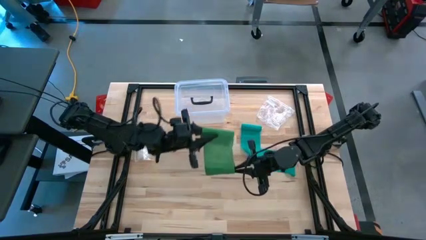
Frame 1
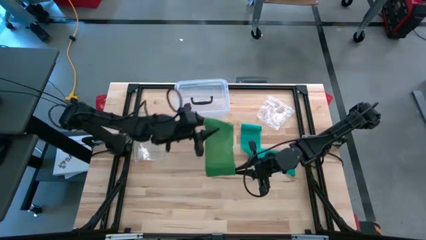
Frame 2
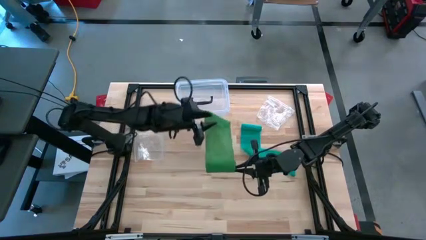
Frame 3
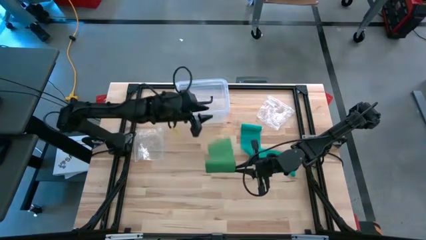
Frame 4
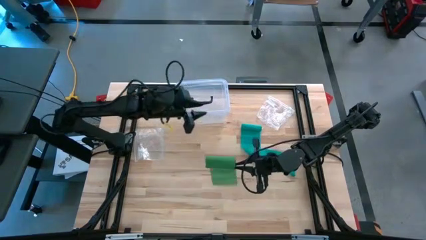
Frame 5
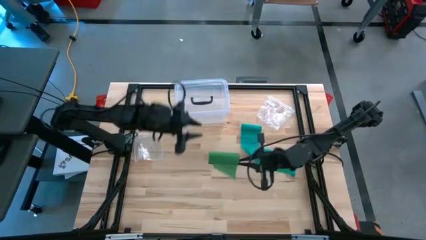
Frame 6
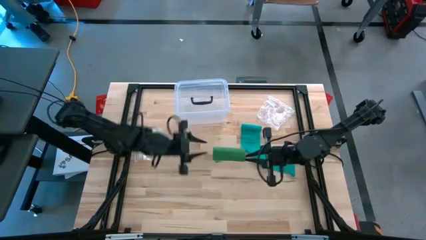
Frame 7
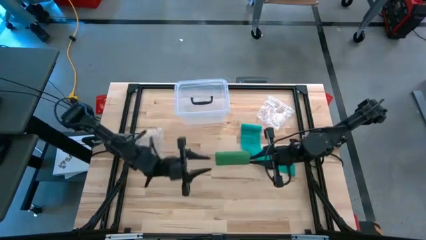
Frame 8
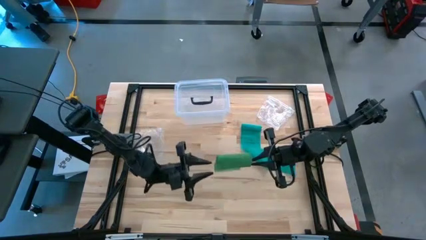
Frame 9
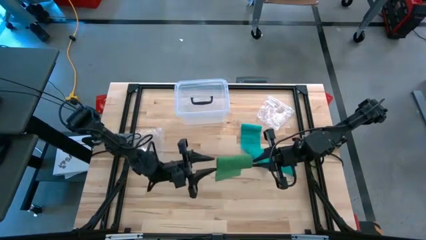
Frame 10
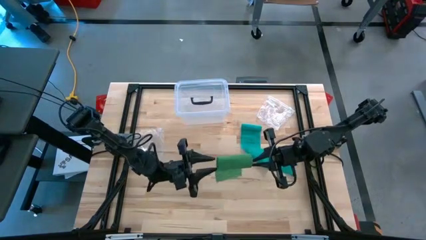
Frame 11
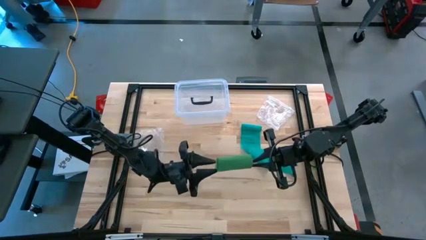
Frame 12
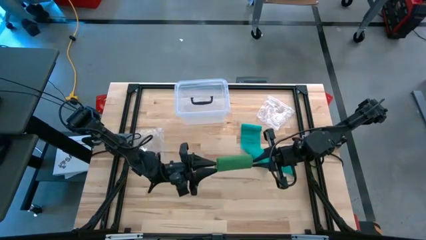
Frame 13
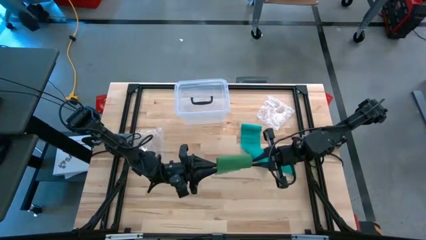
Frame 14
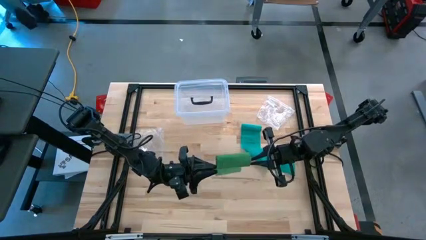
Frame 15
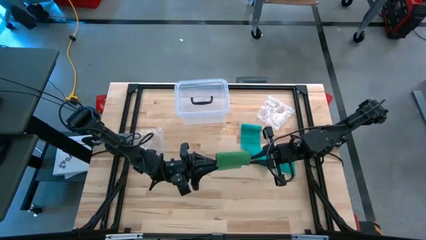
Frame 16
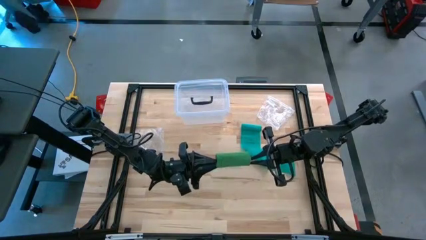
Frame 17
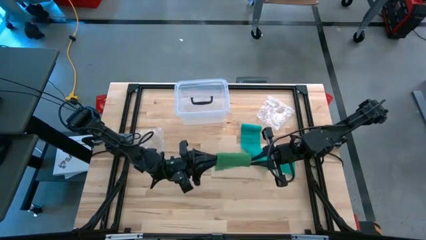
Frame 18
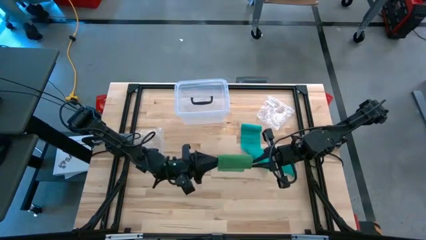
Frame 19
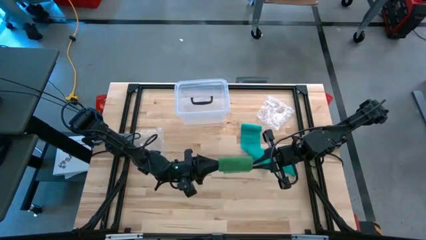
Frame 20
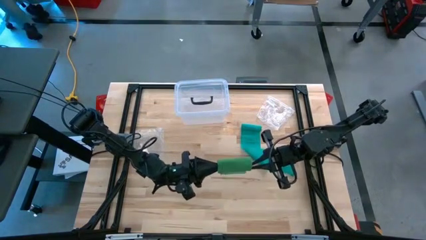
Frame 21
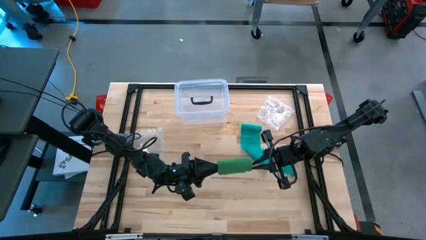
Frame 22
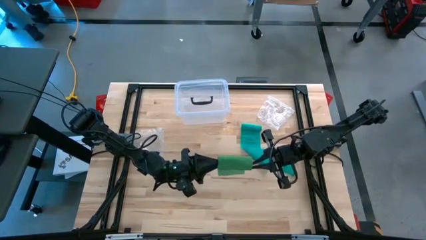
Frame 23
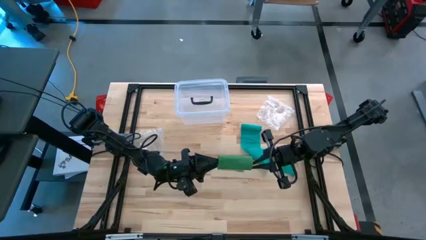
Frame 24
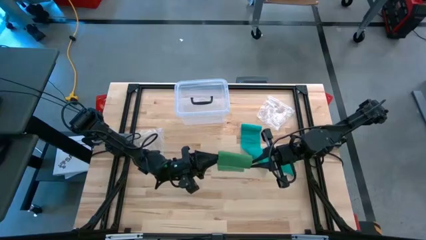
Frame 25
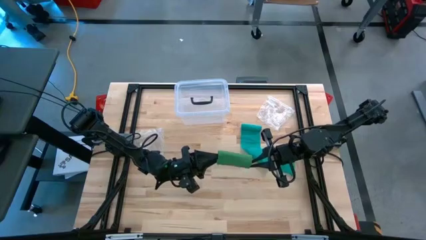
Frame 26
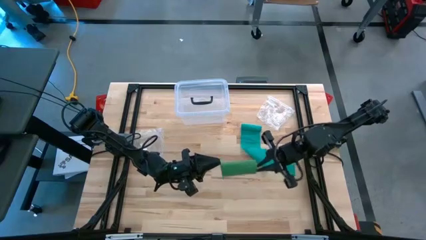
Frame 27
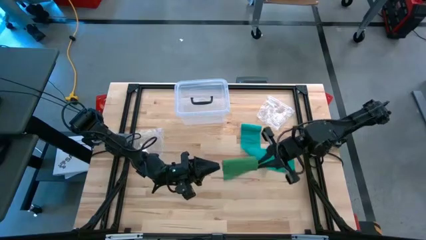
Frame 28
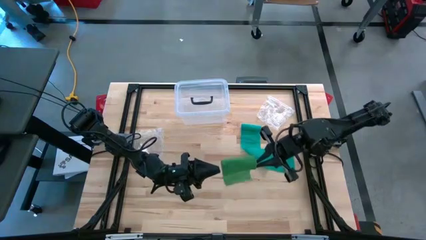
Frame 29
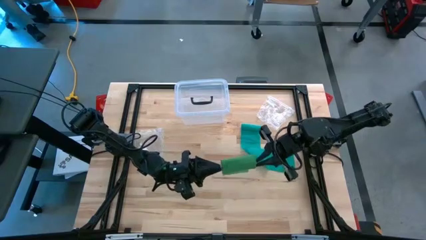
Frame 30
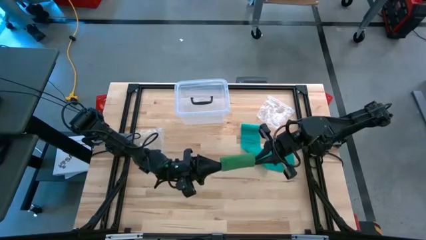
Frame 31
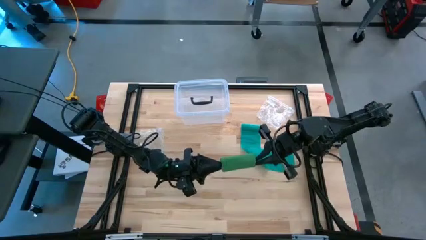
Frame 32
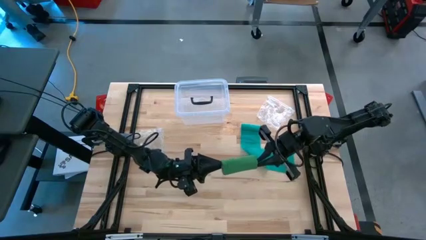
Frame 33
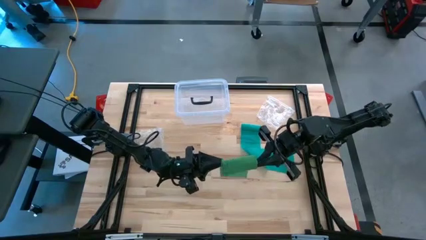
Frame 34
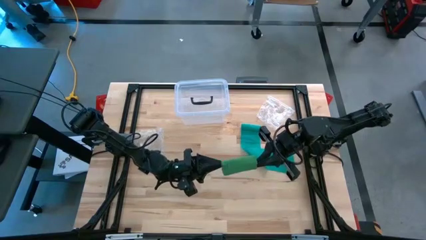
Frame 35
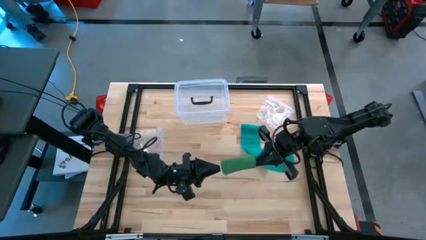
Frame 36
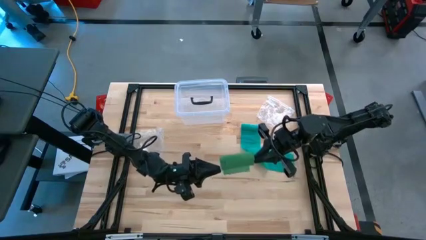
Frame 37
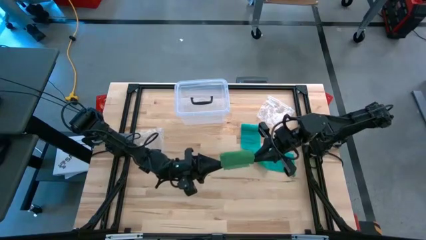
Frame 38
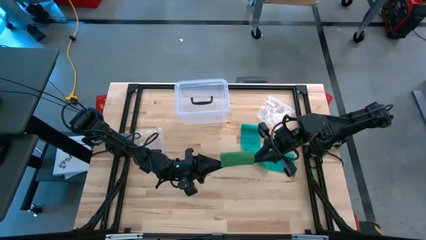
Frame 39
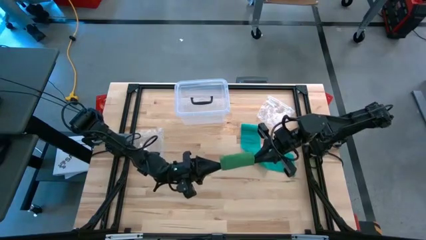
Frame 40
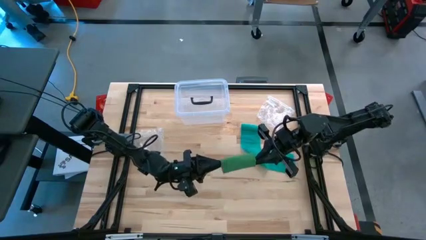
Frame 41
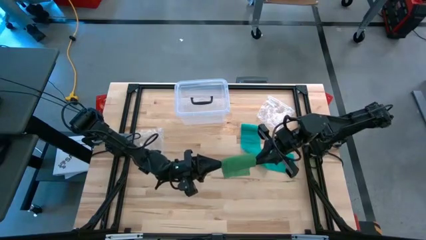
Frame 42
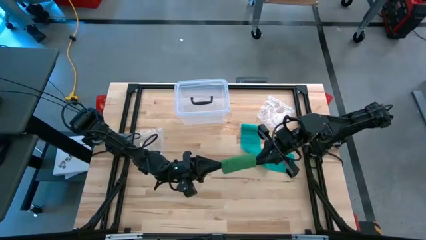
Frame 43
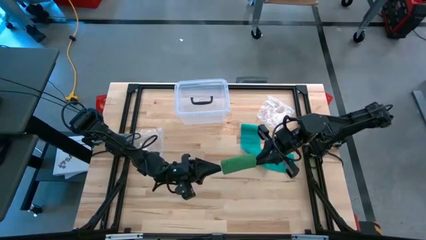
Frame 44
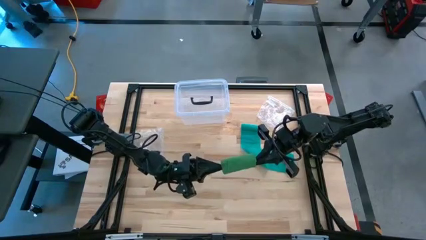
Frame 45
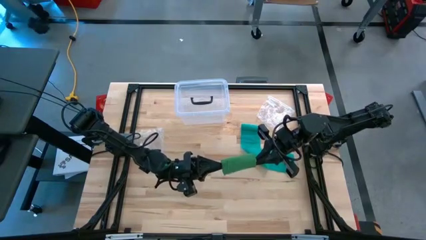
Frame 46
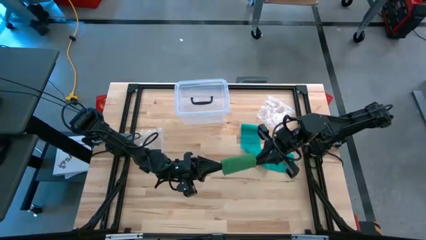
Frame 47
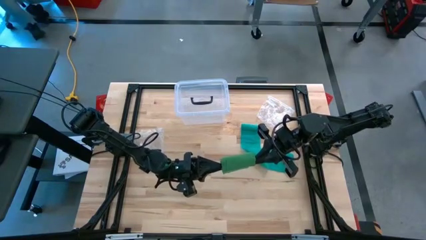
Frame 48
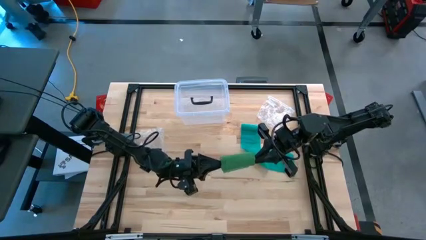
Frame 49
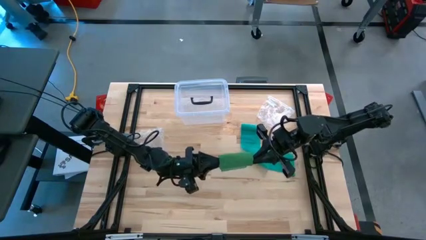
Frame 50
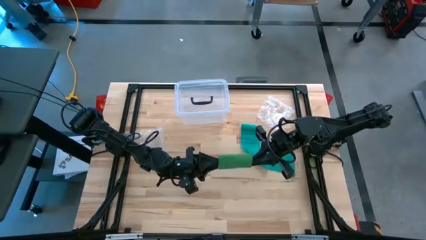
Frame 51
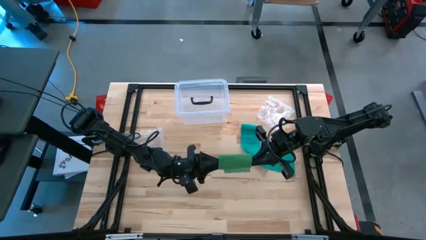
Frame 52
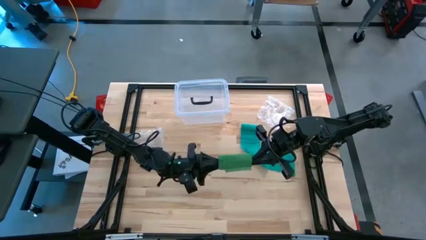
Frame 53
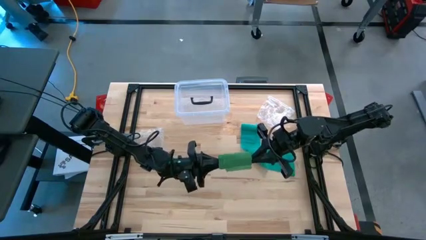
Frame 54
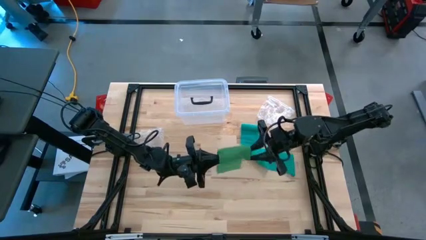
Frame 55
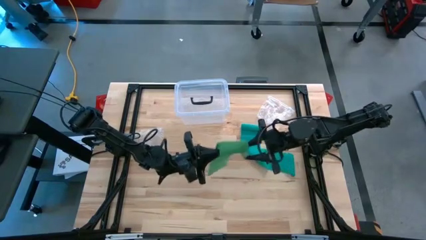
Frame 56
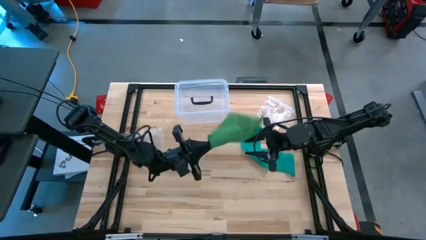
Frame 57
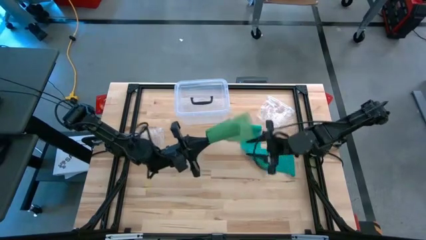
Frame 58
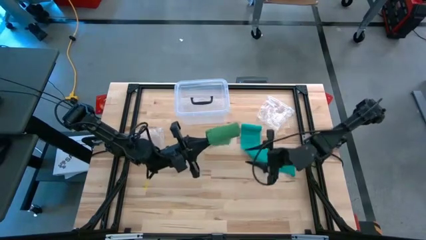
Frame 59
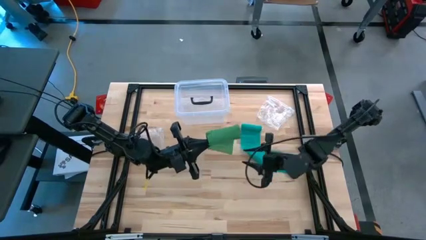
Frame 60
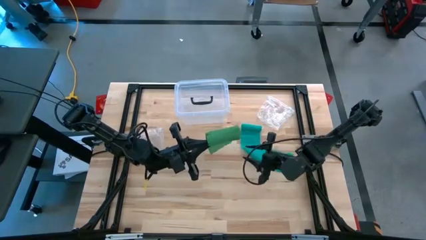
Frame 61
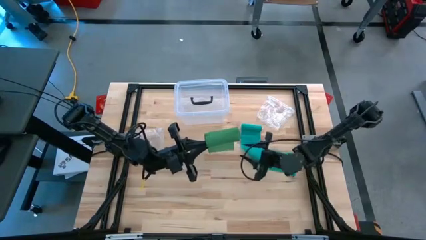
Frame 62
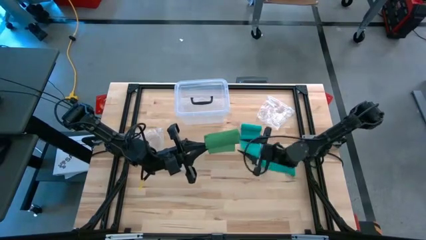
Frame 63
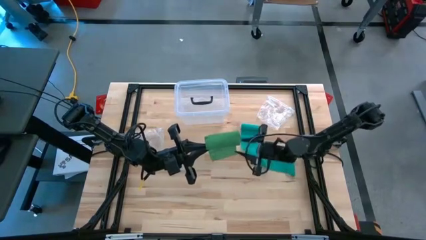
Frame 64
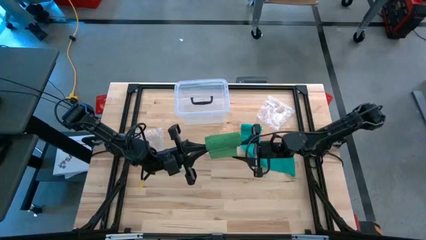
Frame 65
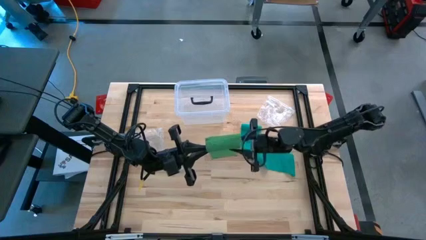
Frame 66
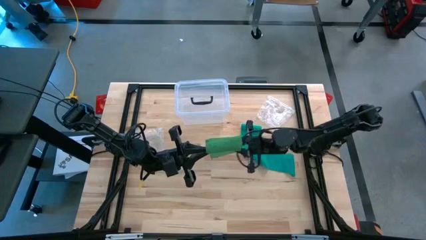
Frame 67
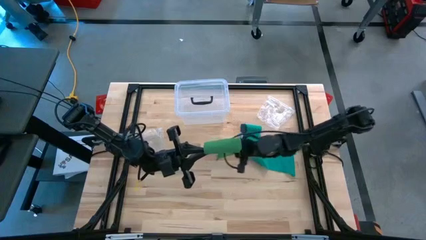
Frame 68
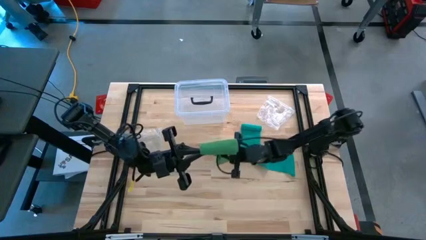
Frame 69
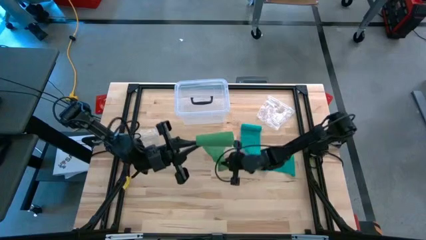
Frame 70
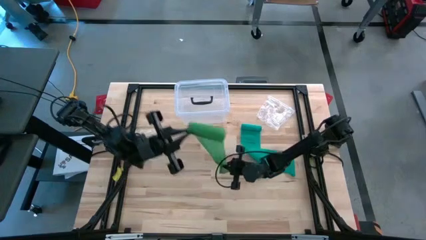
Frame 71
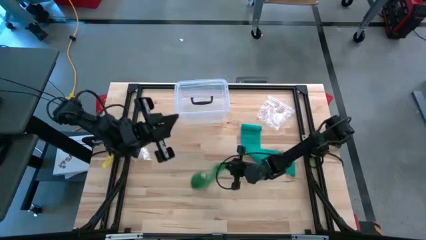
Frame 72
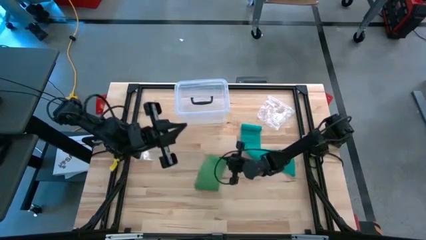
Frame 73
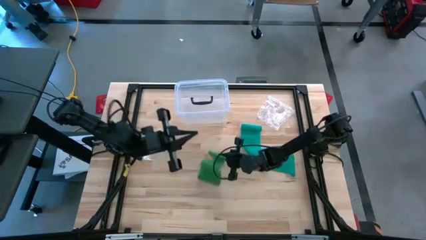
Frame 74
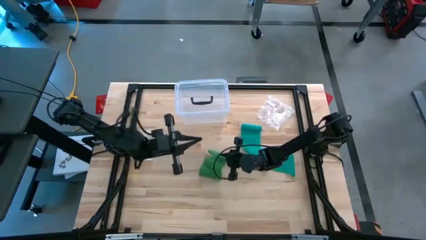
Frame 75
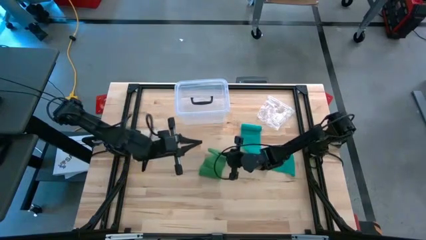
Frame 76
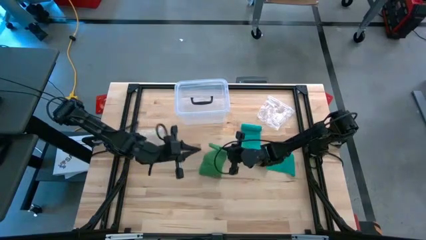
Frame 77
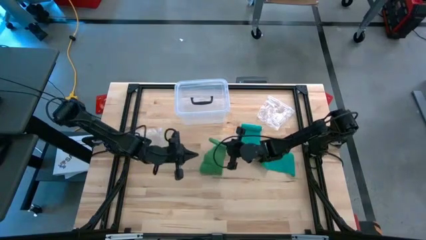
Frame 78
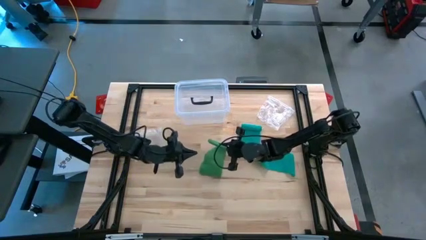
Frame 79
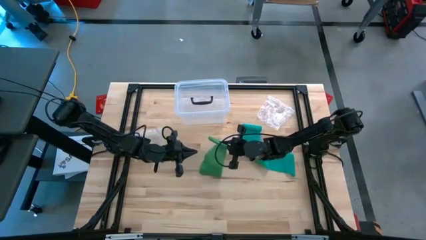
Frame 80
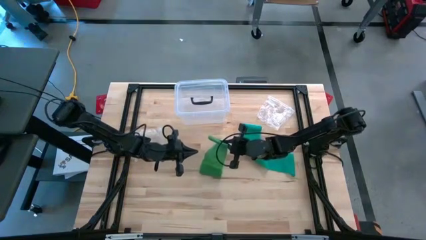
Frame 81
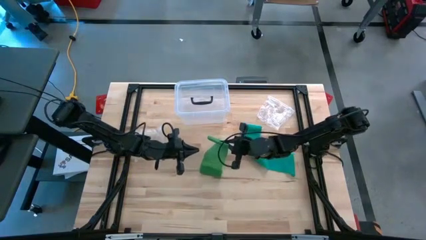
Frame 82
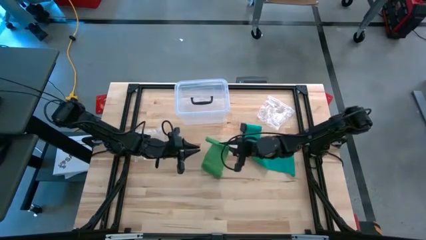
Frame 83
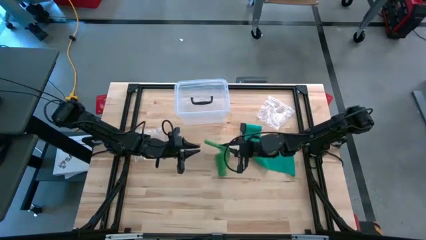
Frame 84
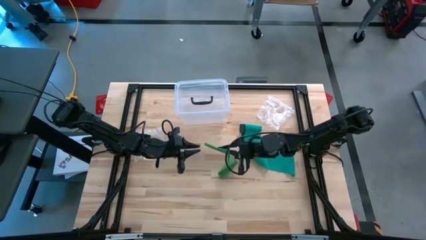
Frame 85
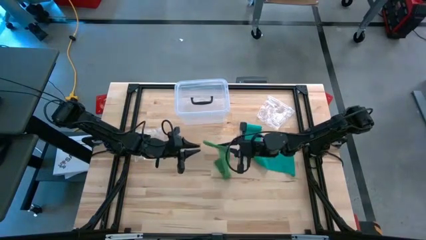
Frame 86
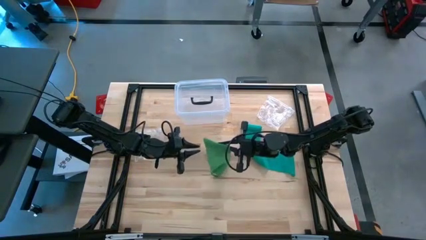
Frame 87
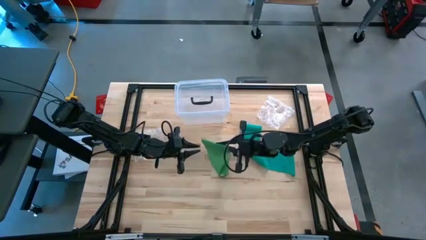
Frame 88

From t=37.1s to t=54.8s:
Task: Roll bandage
Roll the green bandage
